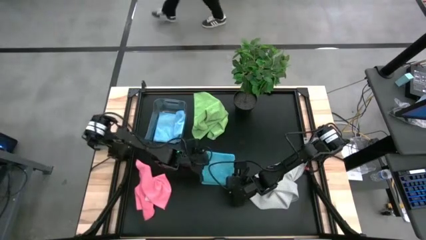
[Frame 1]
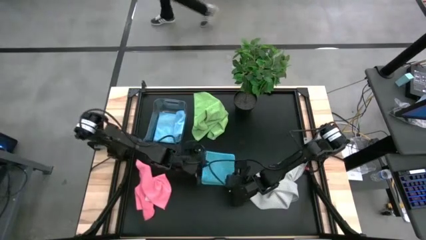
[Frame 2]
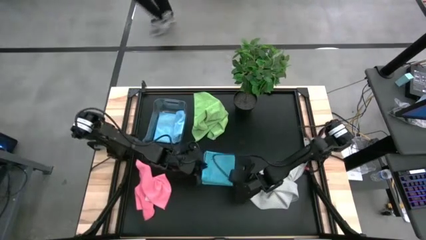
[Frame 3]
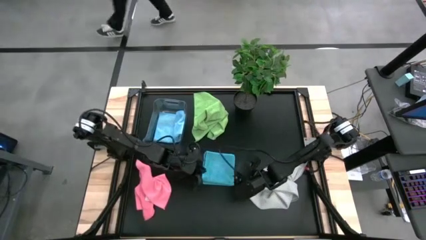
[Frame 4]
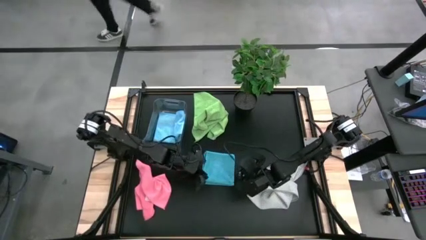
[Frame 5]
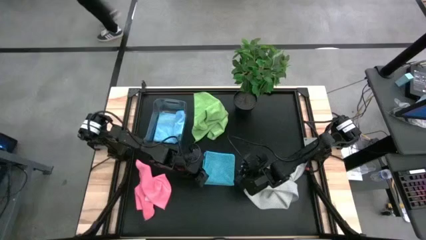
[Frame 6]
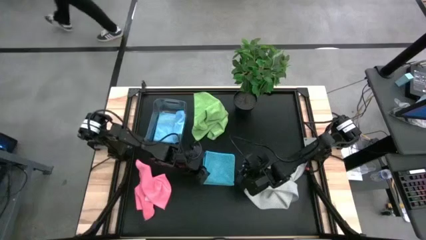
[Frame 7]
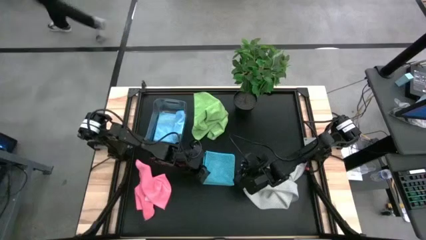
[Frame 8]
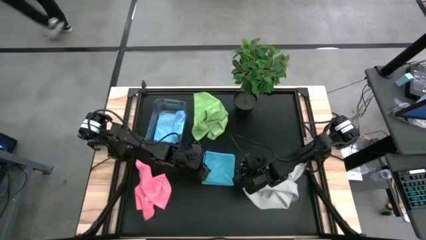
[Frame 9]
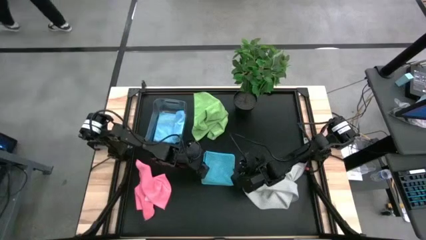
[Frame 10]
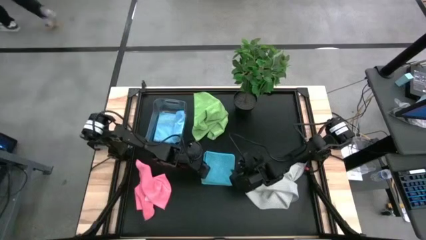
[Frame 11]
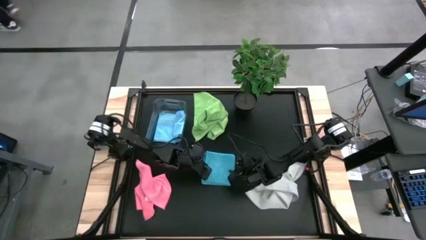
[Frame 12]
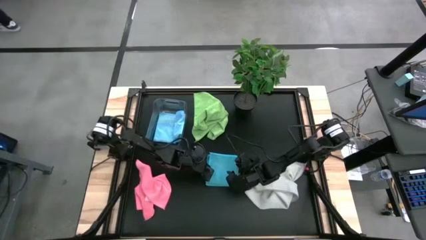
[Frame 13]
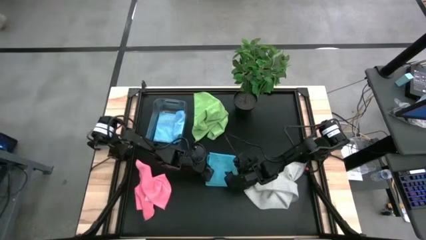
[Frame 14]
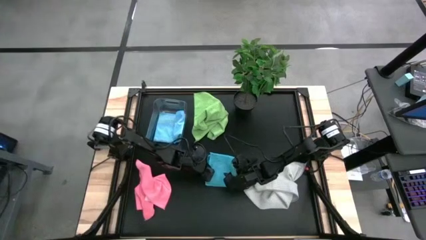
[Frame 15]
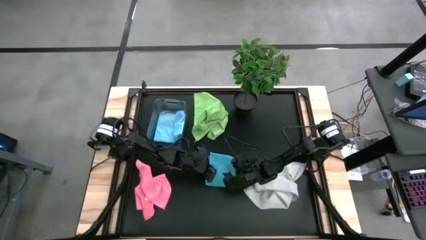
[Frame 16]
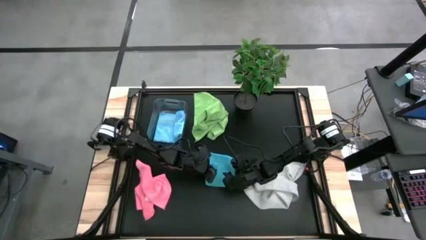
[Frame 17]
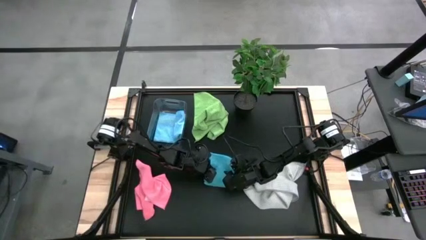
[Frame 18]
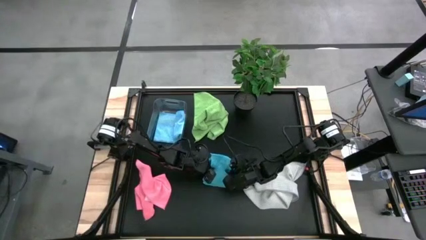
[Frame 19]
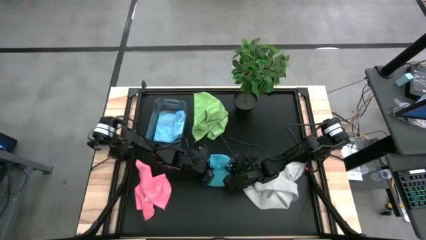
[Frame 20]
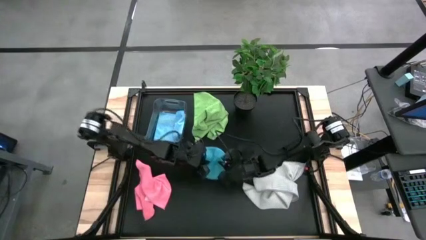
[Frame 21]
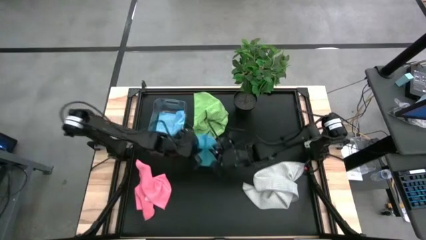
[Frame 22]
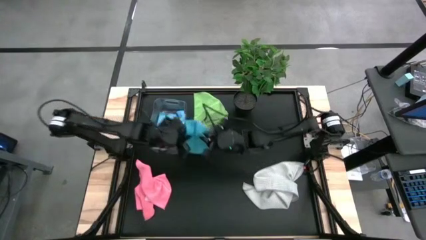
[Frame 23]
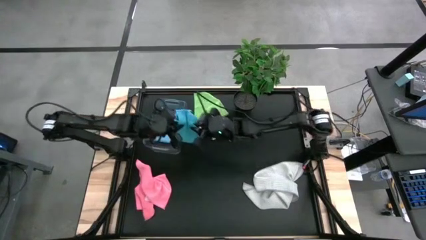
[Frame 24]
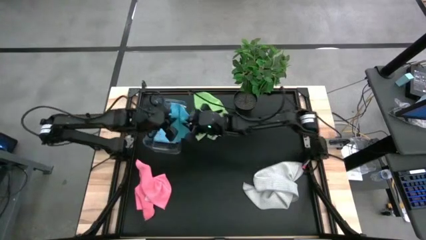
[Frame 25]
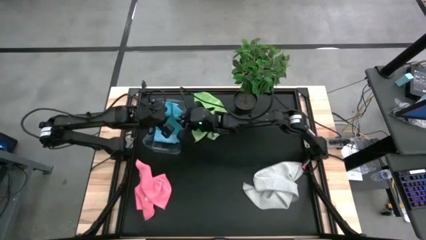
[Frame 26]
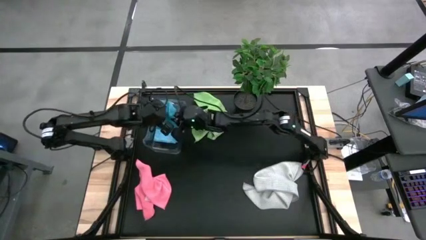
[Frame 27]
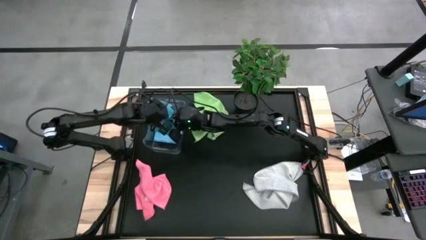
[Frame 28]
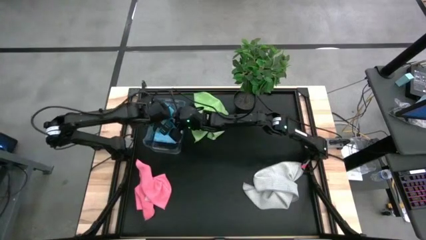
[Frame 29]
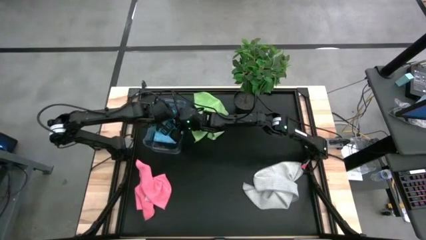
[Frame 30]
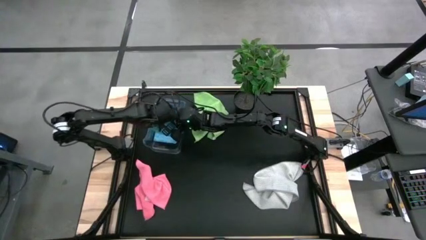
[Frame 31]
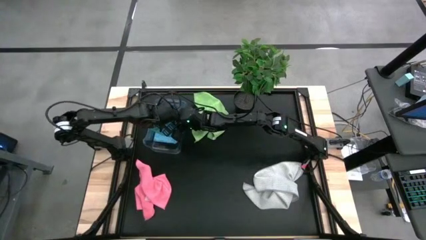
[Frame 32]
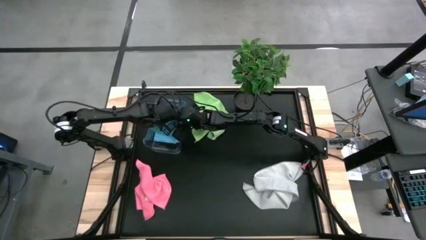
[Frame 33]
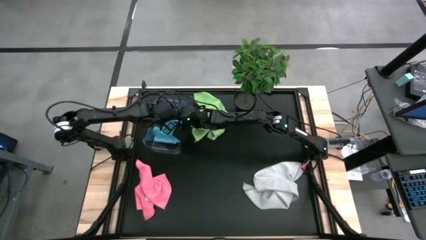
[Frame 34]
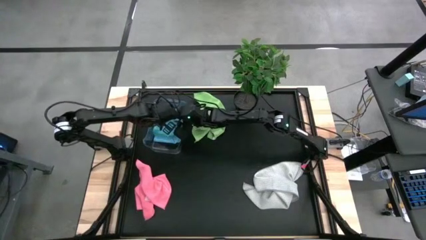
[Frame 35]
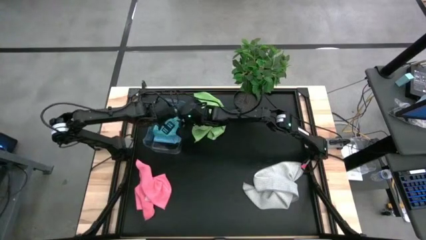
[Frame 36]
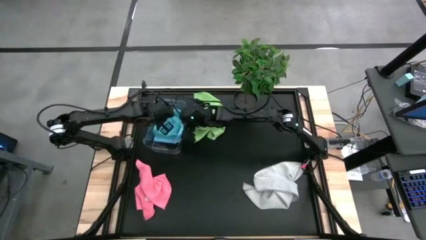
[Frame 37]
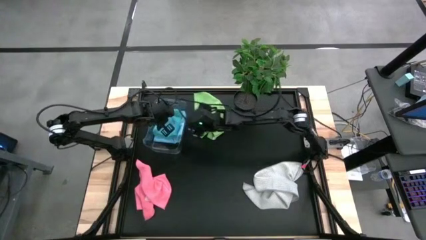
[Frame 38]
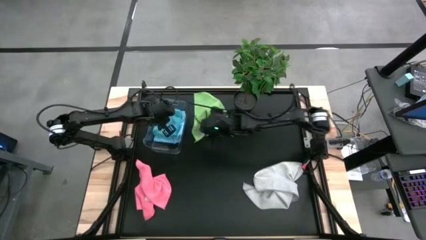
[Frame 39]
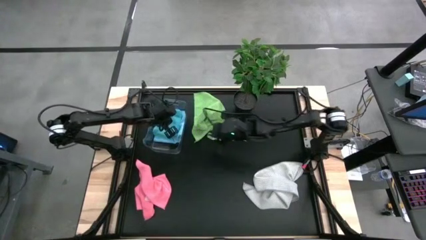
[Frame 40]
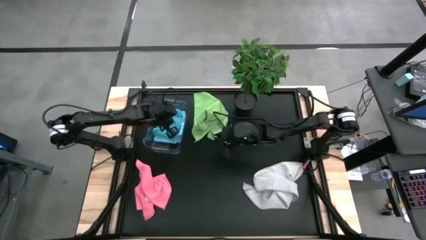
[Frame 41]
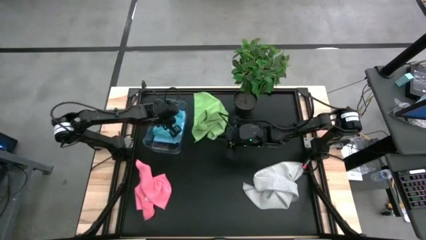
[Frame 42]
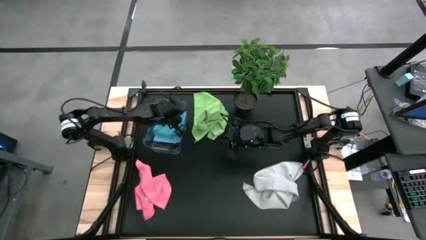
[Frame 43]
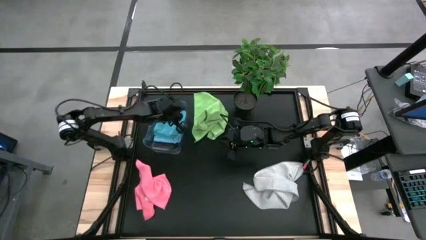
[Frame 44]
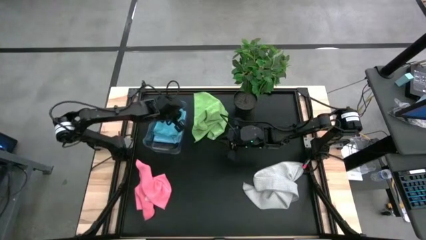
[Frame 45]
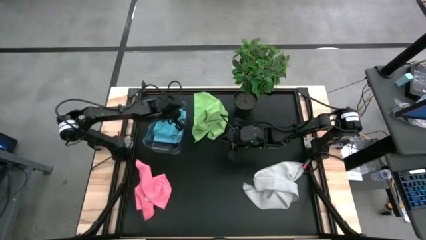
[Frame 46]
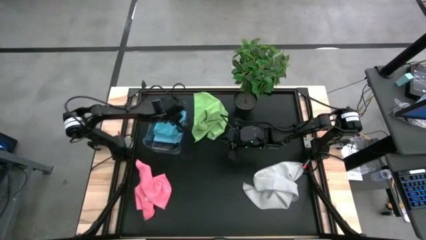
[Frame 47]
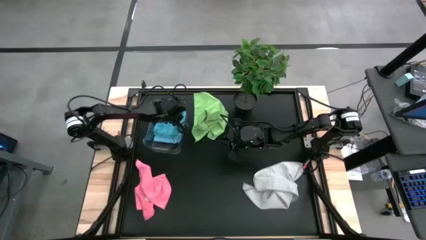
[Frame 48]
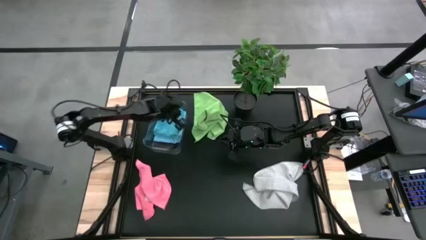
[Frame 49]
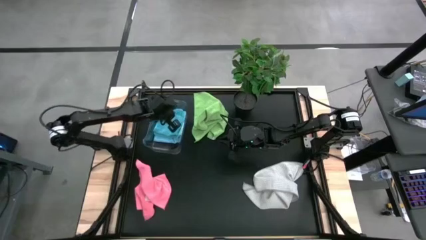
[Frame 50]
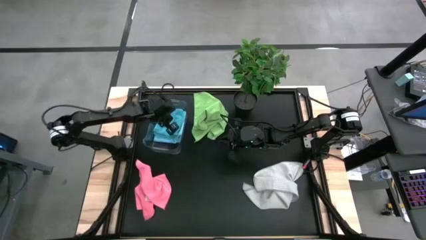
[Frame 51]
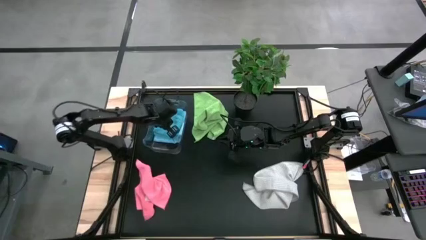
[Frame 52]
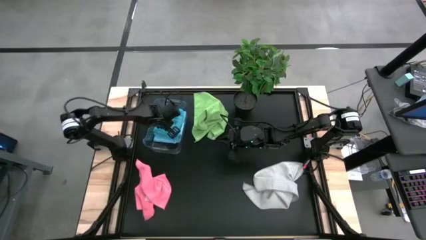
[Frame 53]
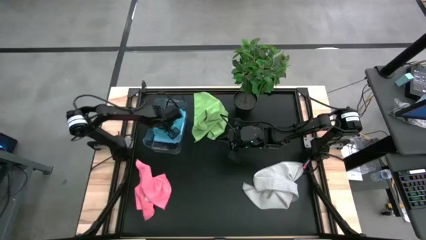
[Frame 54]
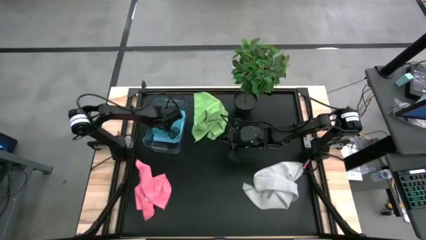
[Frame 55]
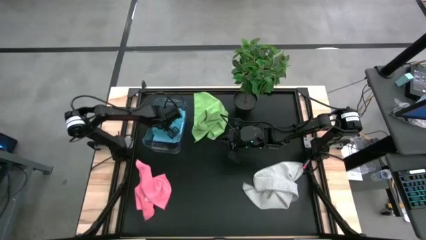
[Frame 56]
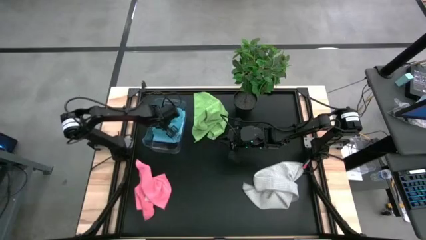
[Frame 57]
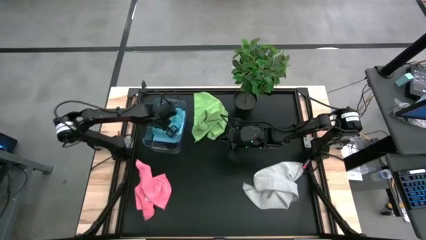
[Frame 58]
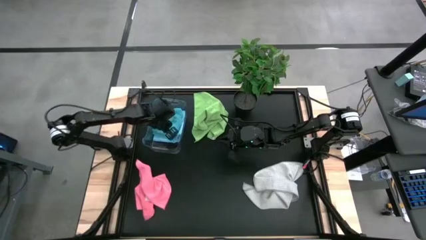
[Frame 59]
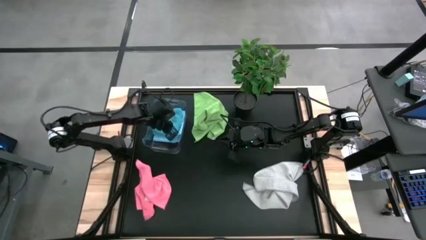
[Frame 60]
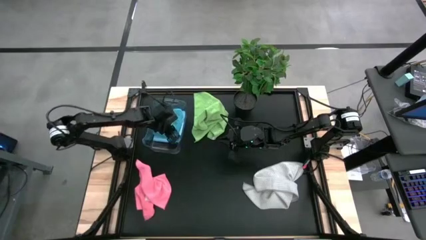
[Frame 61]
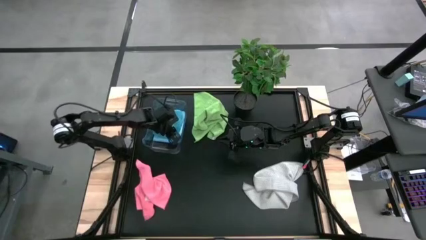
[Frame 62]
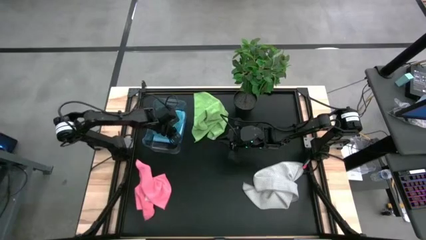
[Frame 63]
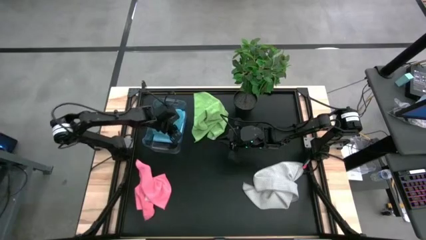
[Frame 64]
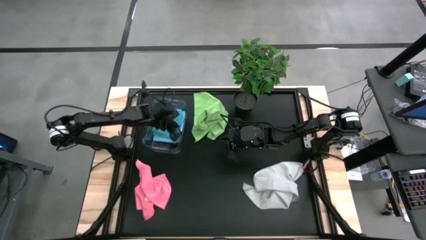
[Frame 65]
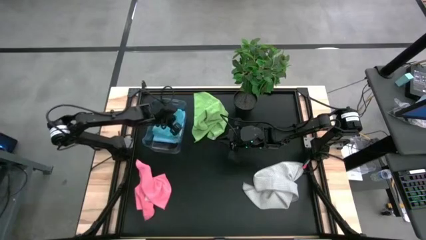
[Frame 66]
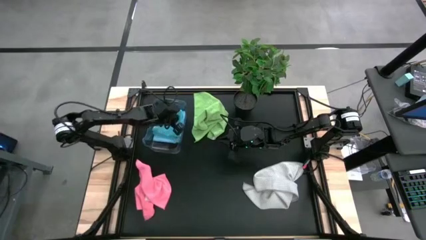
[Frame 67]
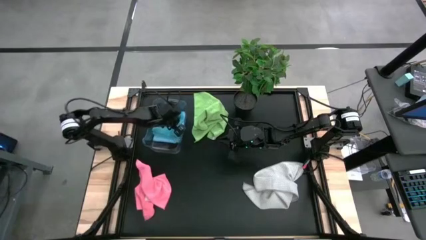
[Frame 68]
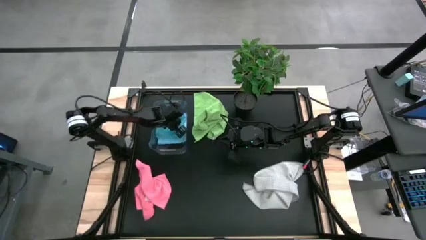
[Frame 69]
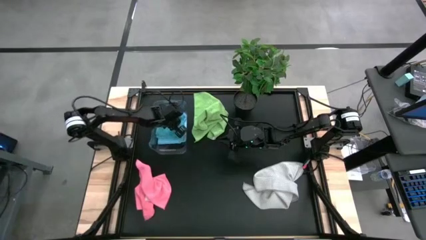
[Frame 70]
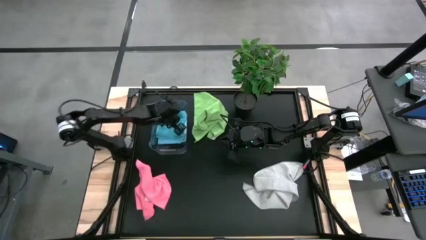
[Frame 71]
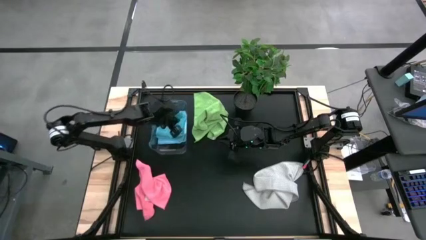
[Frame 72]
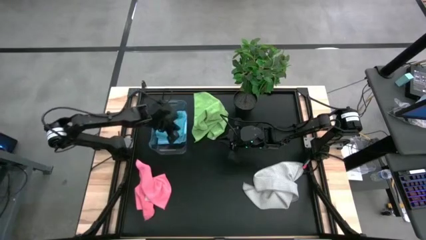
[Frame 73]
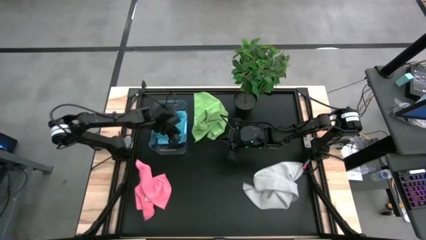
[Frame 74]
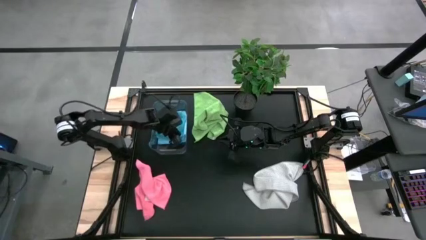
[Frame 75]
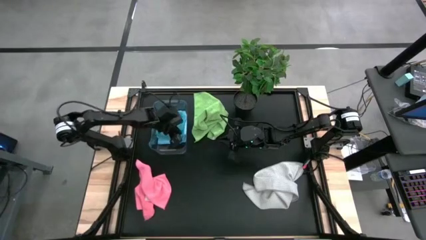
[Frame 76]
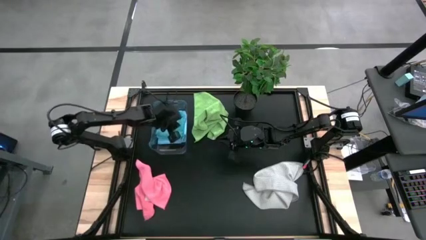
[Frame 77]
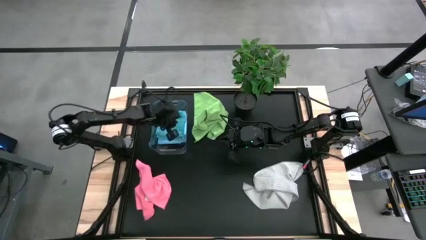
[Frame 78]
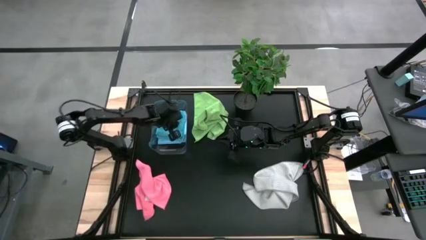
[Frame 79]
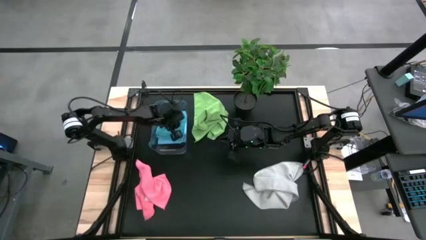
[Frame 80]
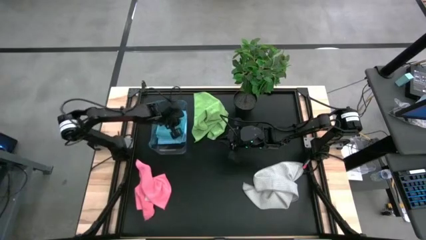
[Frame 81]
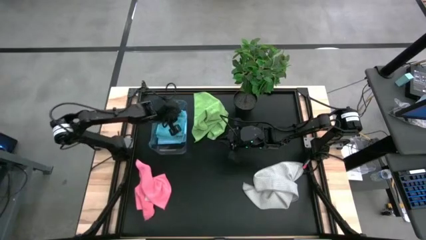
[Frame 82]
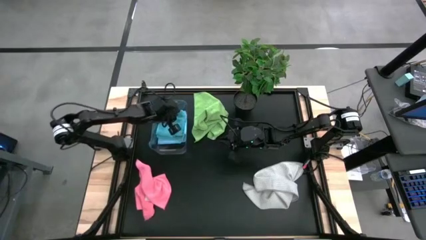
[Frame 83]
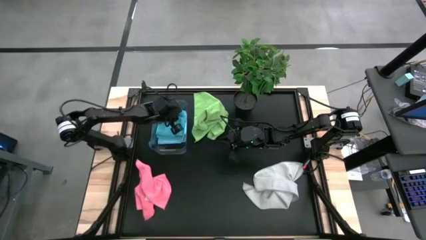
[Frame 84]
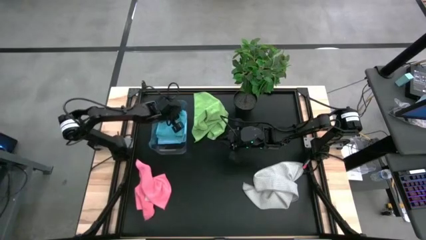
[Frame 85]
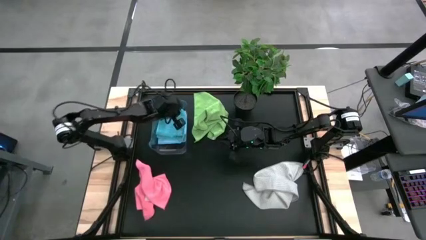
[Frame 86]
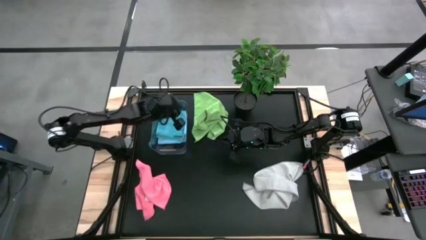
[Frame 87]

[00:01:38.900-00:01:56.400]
Task: Fold microfiber towels
Put the folded blue microfiber towel into the bin
